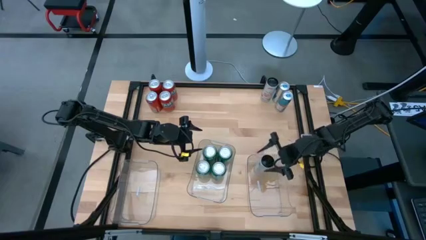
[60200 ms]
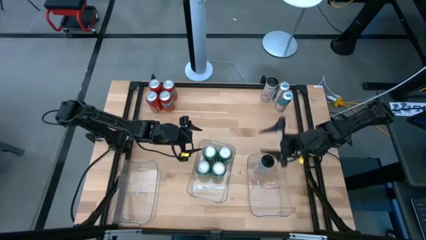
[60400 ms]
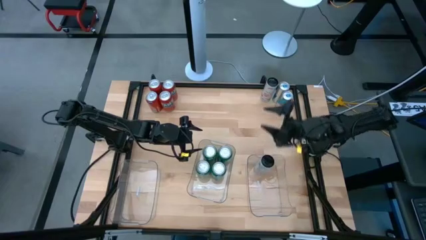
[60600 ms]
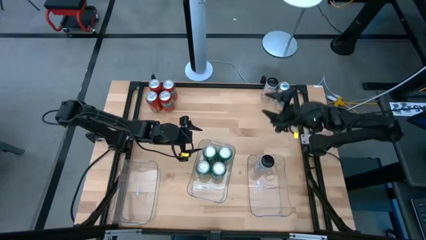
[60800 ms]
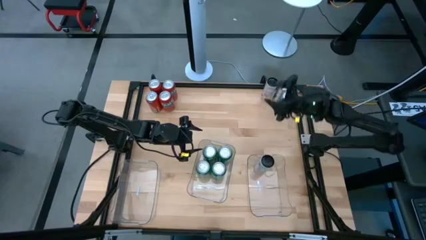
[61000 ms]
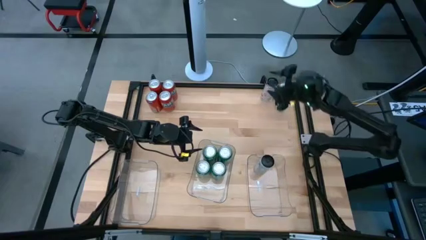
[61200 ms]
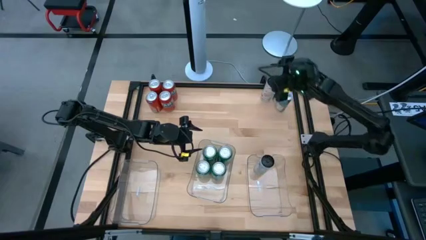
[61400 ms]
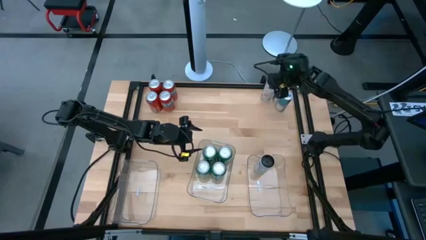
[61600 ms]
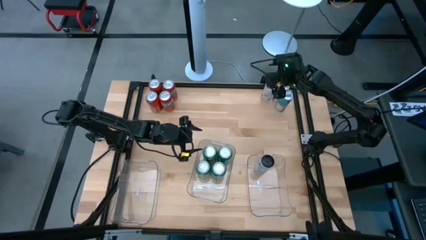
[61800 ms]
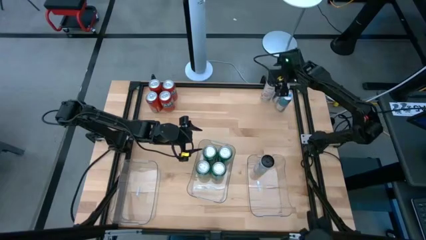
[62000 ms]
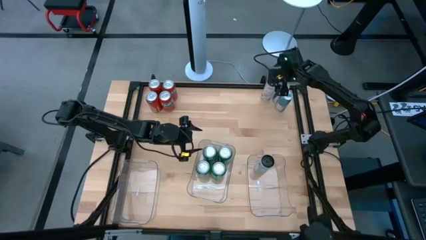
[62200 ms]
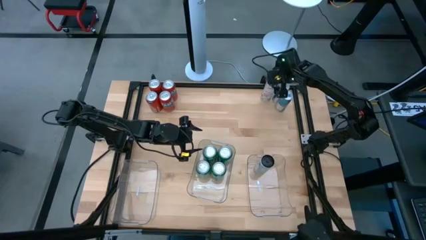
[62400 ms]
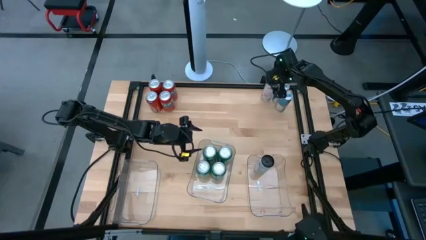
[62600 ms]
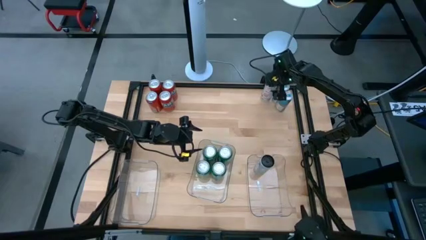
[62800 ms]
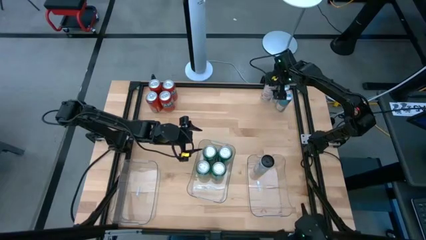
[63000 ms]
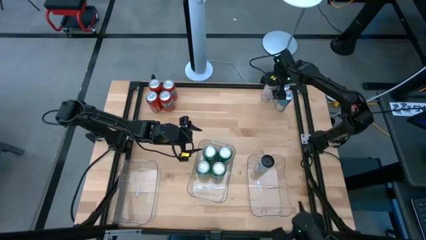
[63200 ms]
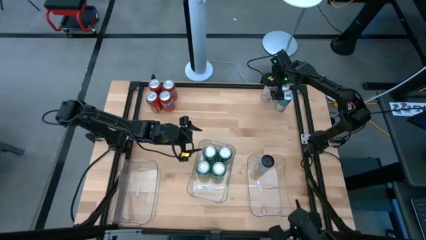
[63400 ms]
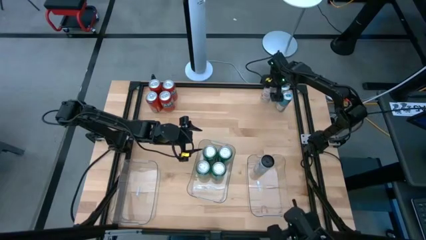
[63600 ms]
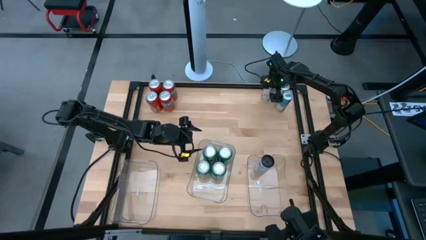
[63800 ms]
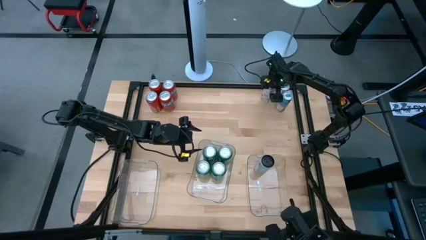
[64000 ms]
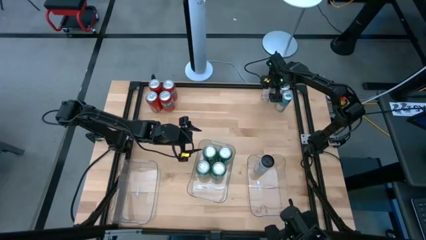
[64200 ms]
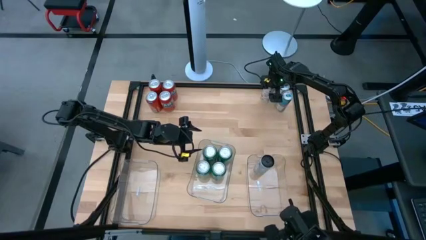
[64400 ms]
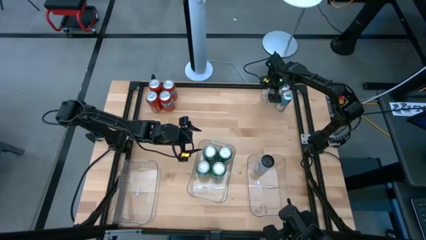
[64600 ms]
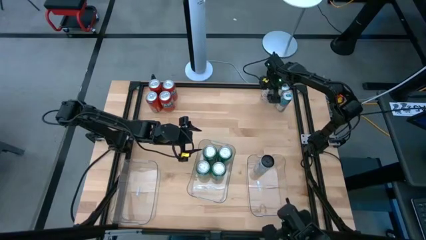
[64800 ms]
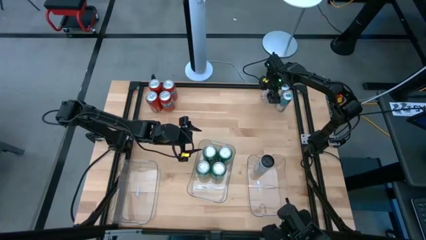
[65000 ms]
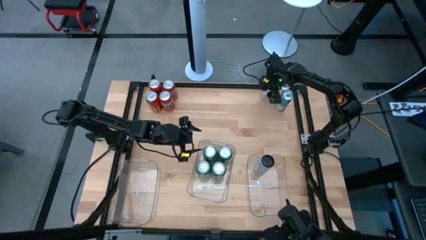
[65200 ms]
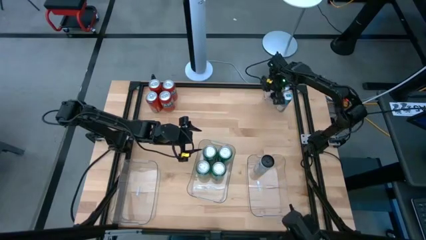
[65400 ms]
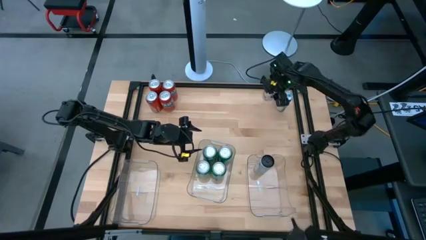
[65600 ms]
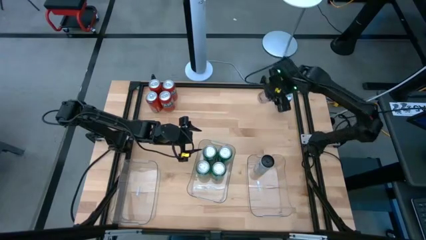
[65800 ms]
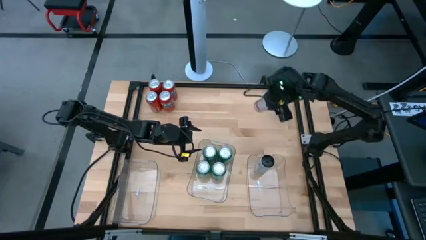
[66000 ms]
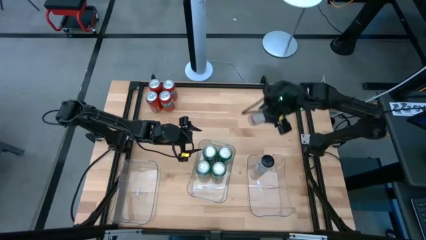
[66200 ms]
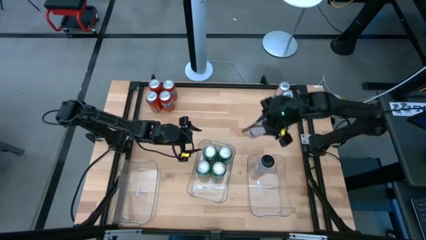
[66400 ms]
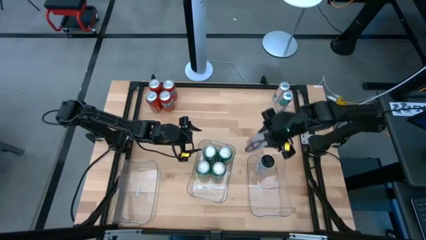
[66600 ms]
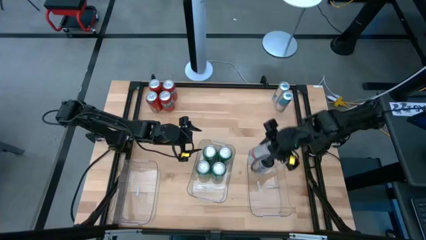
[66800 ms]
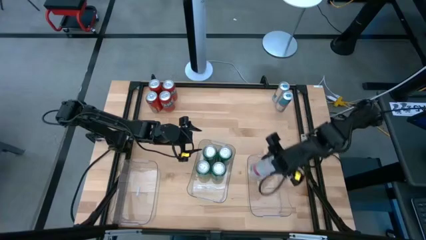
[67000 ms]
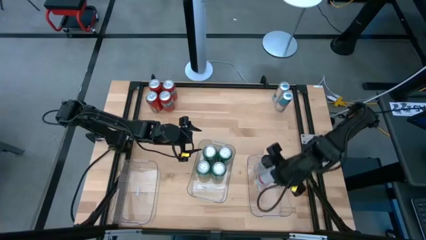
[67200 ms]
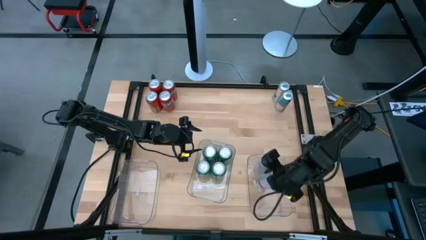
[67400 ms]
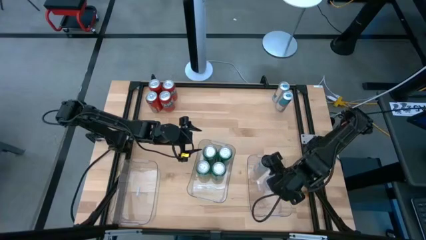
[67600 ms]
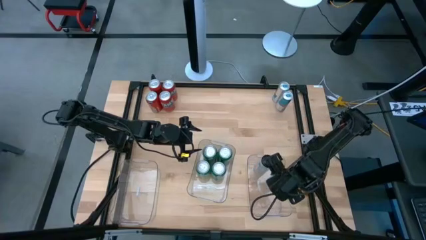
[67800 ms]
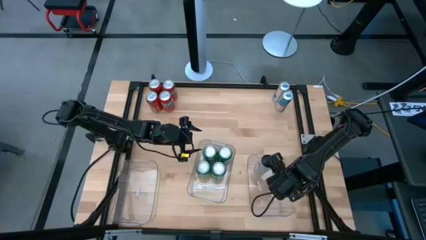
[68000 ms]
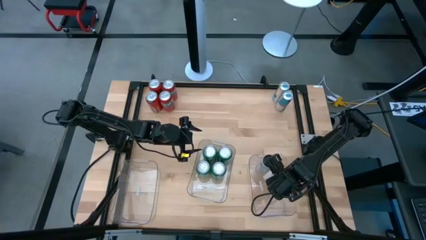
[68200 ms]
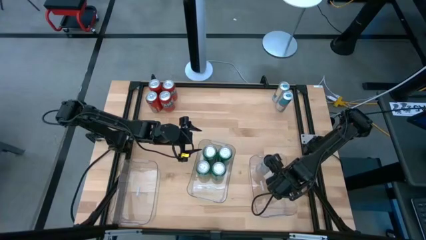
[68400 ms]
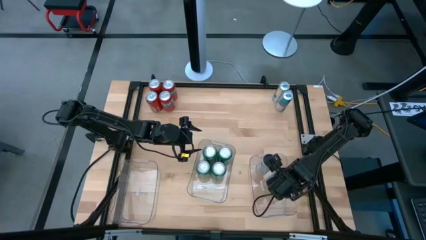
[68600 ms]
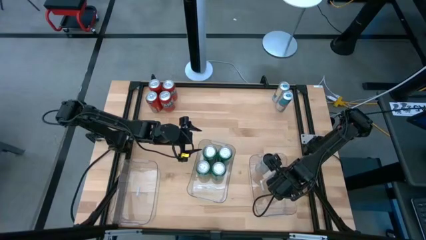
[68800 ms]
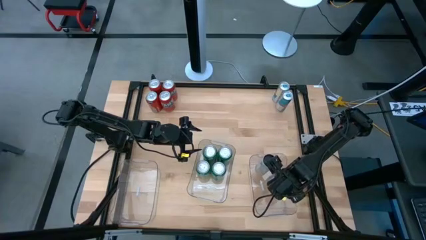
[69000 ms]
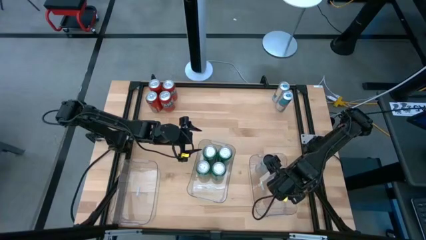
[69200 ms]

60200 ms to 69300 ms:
Task: Sort soda cans
Put the white-pink soda can into the right transparent bin

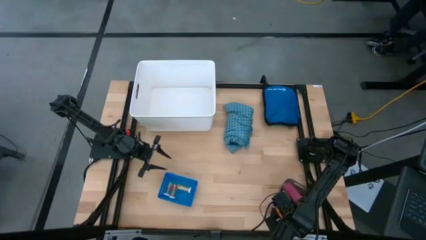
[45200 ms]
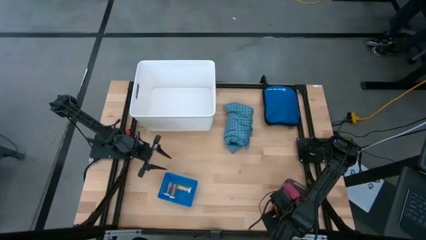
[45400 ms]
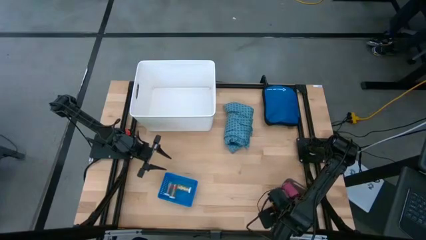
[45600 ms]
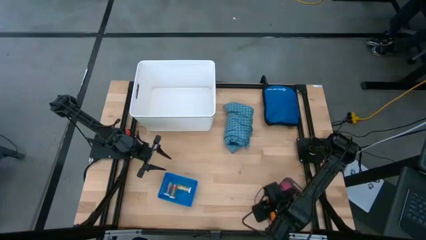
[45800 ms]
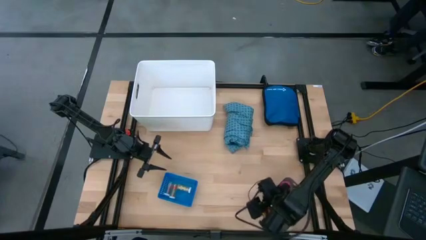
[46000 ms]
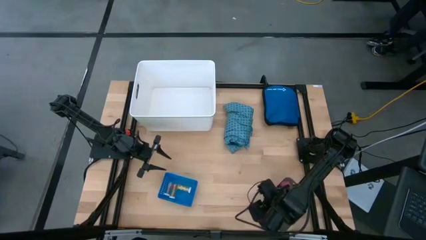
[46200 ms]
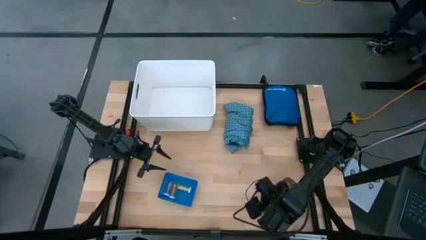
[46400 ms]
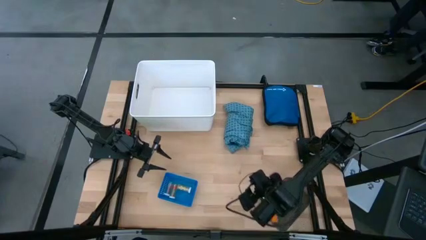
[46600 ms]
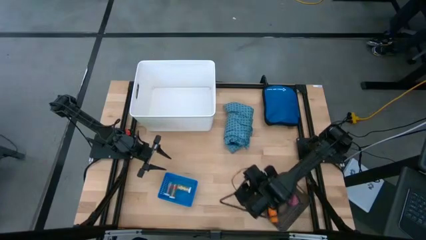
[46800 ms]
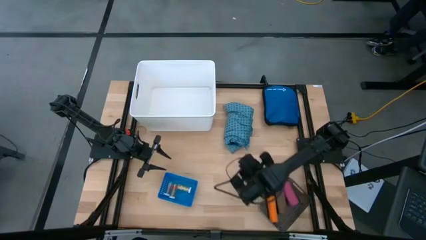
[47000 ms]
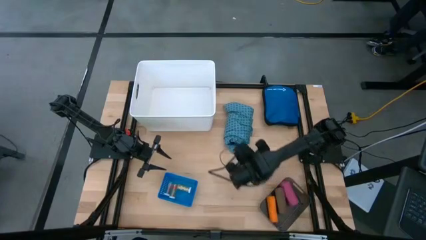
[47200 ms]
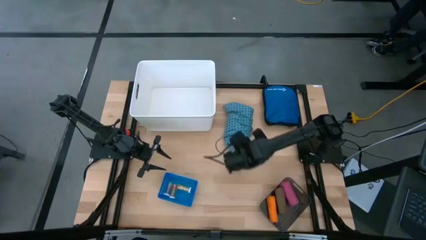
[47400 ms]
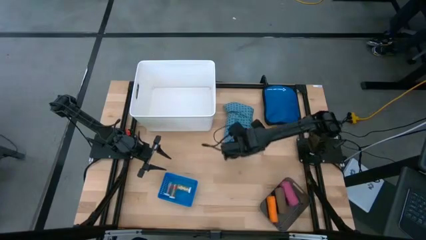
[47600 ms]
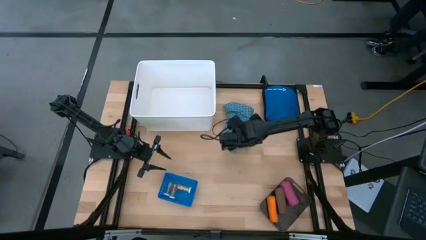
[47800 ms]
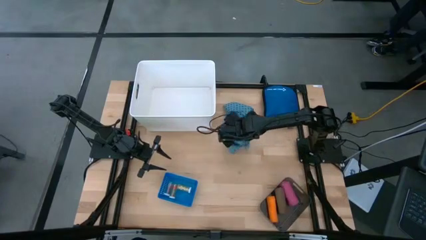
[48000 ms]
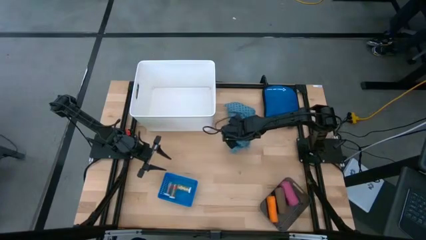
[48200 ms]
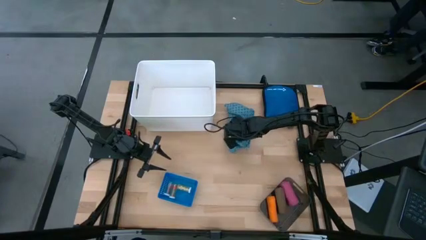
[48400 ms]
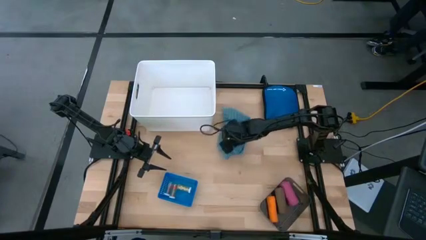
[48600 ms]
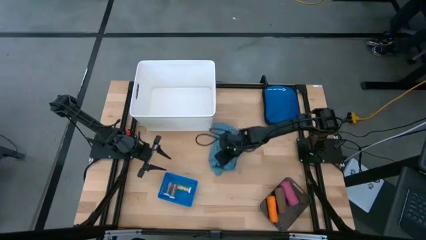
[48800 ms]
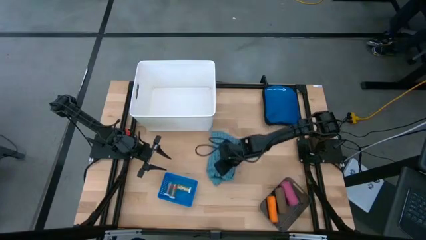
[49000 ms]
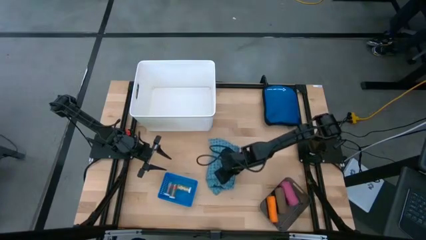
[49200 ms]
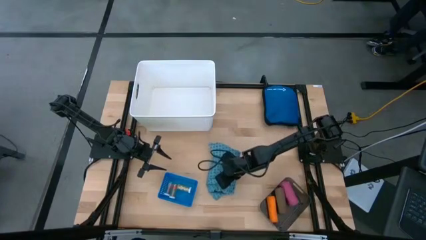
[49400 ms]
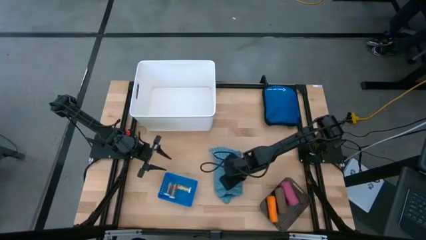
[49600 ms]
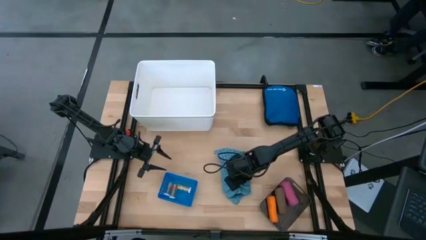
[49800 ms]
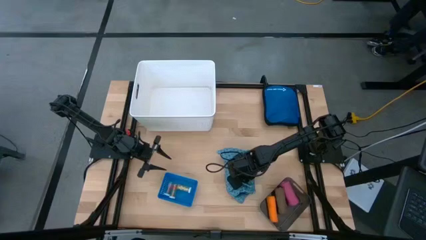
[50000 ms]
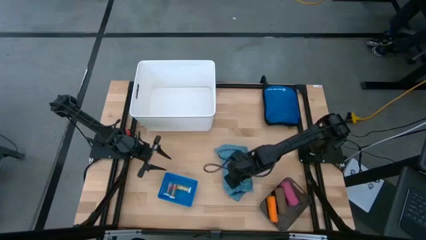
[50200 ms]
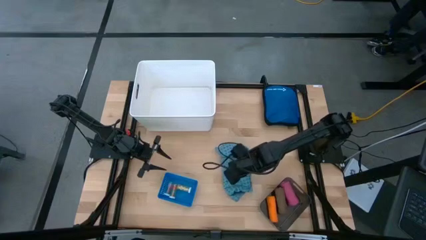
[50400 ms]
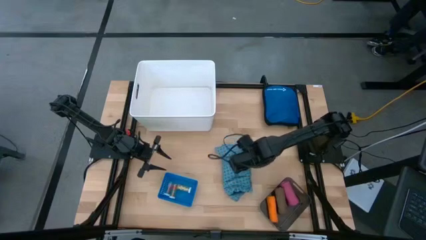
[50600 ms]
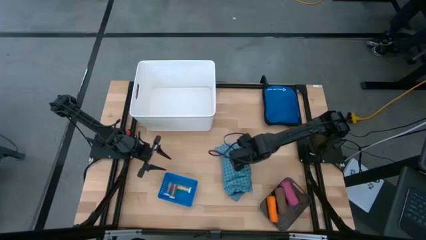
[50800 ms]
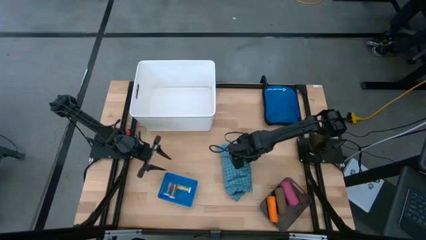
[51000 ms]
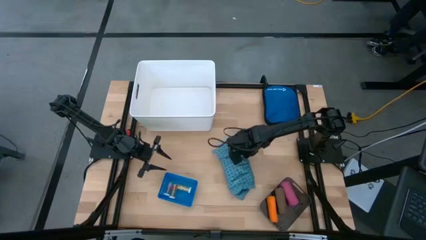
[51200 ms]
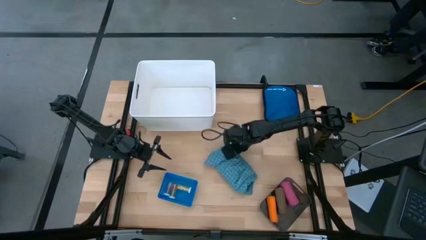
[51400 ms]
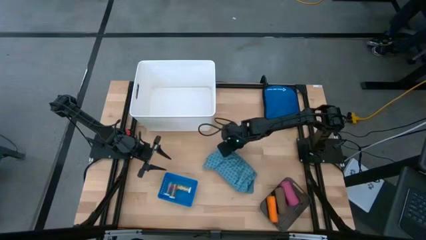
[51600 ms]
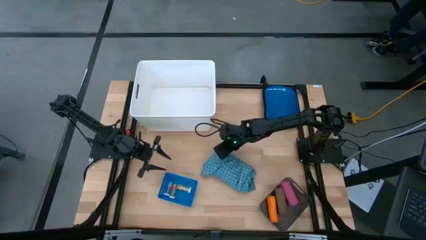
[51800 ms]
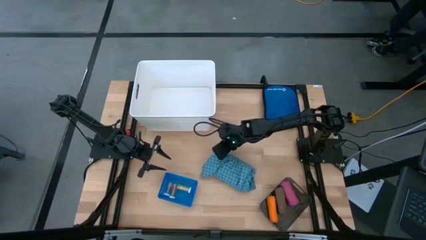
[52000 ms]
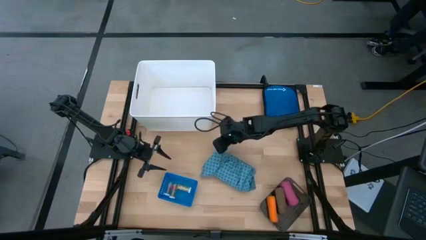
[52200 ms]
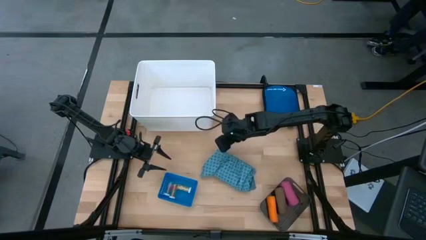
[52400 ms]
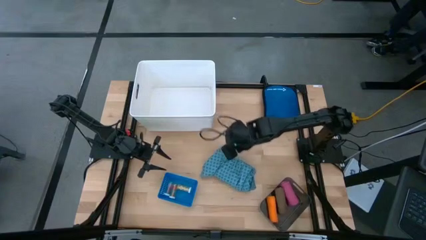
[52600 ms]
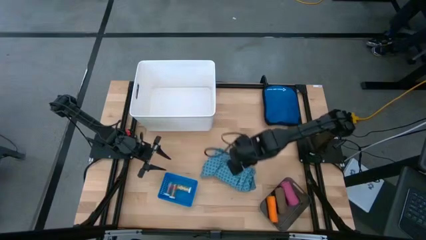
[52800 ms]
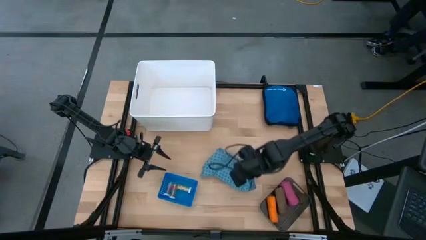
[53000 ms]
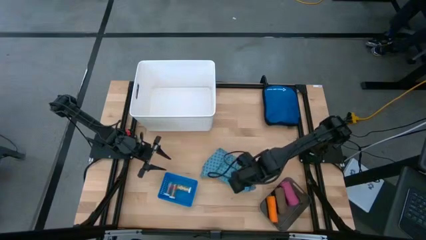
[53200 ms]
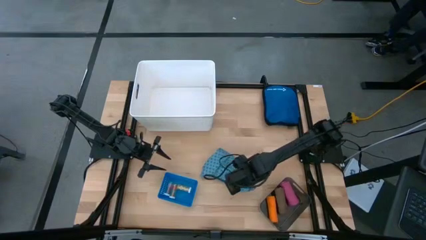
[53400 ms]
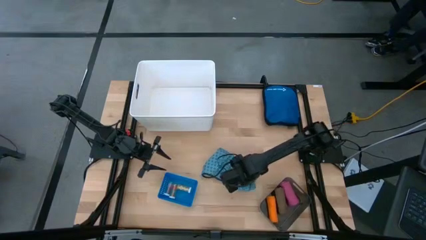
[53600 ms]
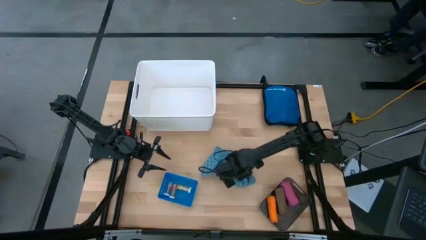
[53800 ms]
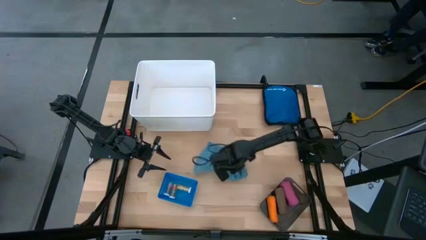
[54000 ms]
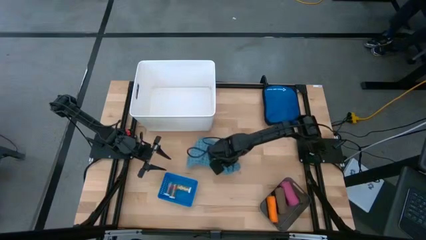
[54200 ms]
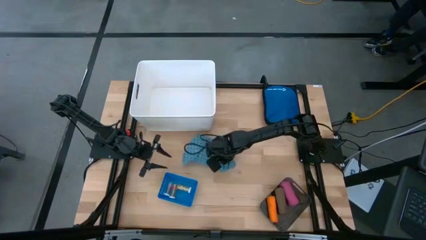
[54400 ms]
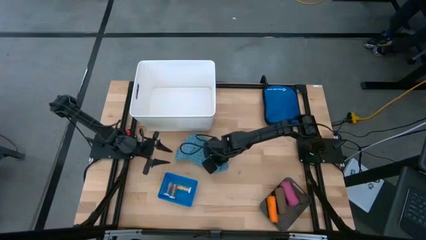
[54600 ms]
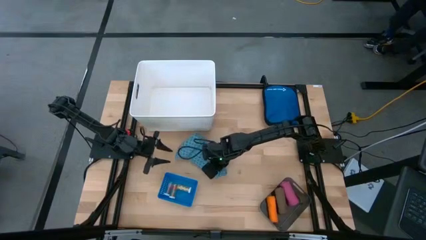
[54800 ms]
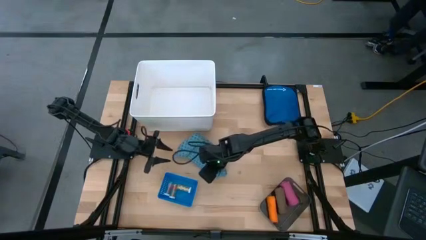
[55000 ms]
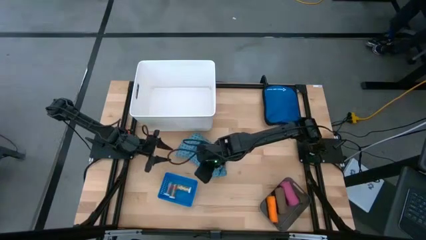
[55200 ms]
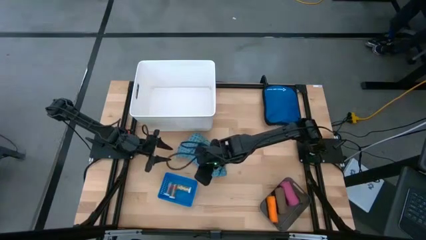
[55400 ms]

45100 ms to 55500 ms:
Task: Pick & Place Medicine items
Put the blue patient gown into the white bin
